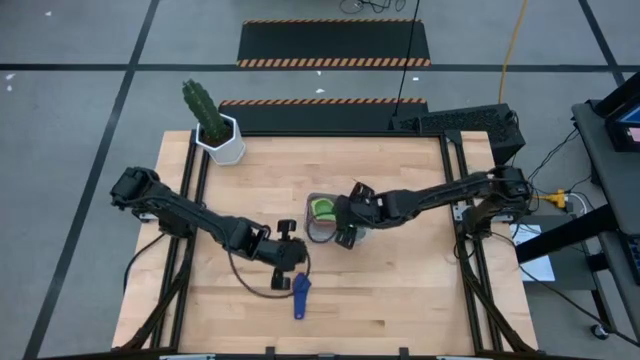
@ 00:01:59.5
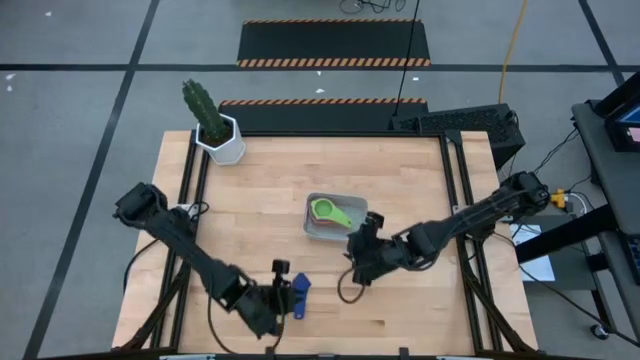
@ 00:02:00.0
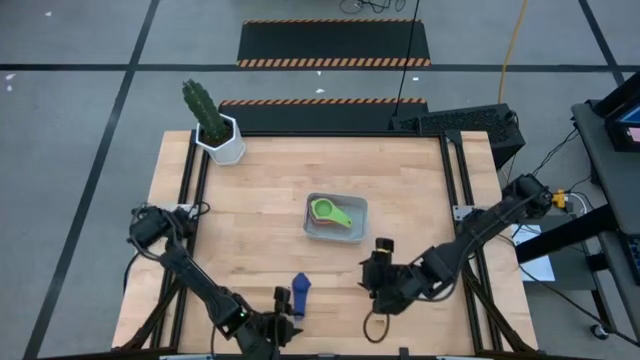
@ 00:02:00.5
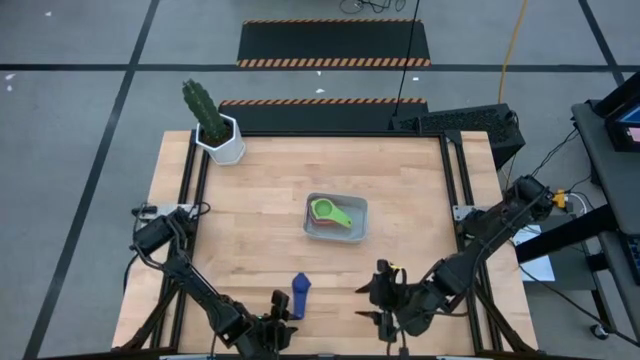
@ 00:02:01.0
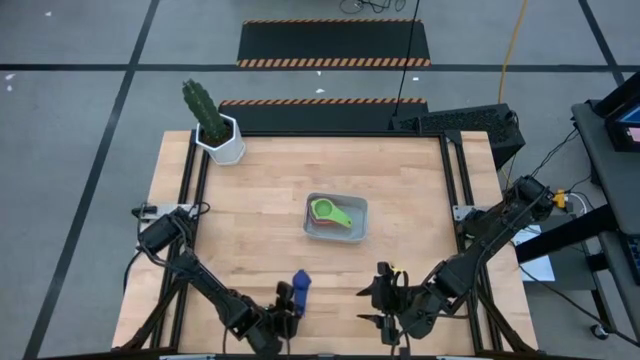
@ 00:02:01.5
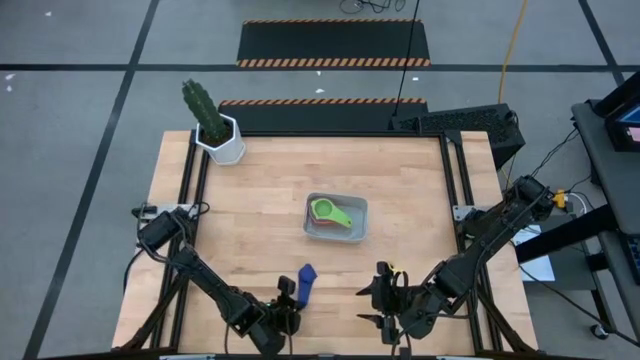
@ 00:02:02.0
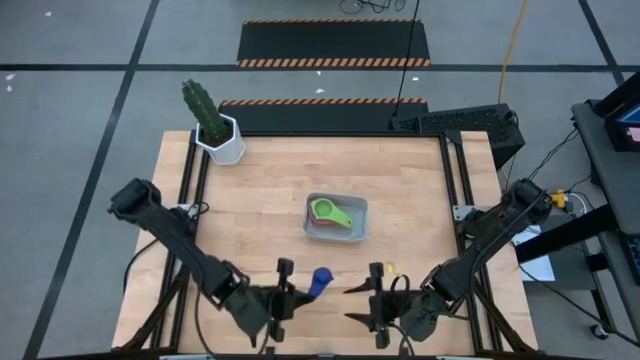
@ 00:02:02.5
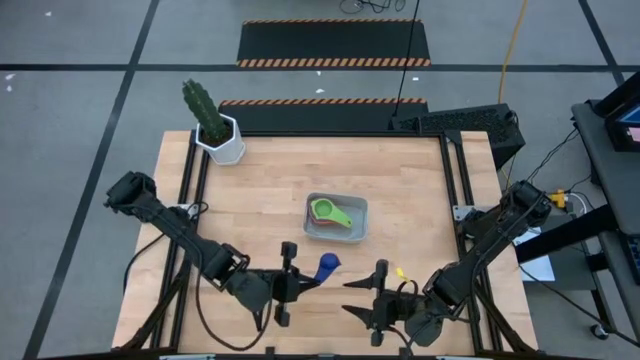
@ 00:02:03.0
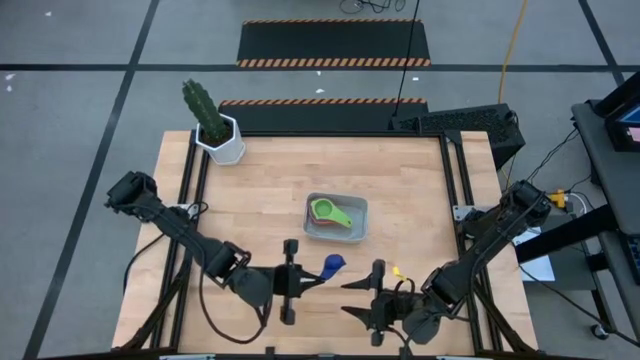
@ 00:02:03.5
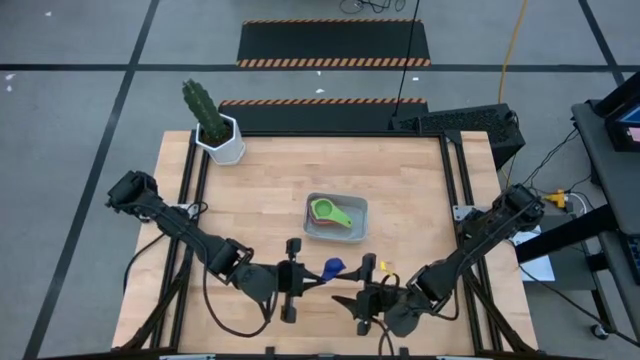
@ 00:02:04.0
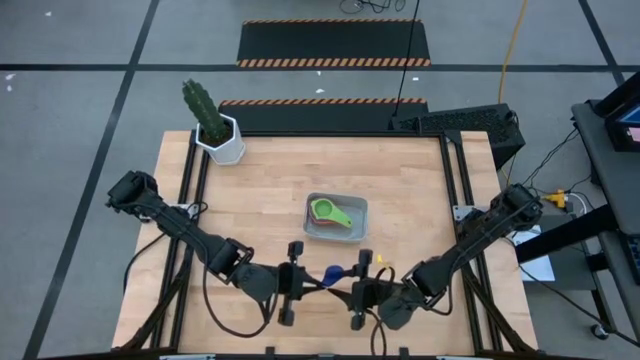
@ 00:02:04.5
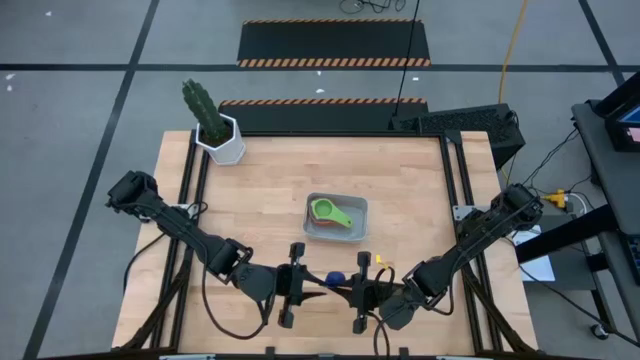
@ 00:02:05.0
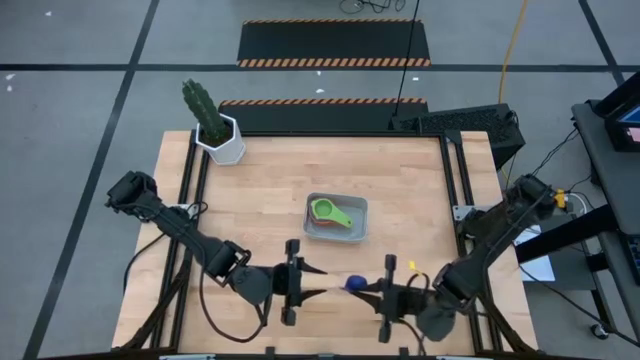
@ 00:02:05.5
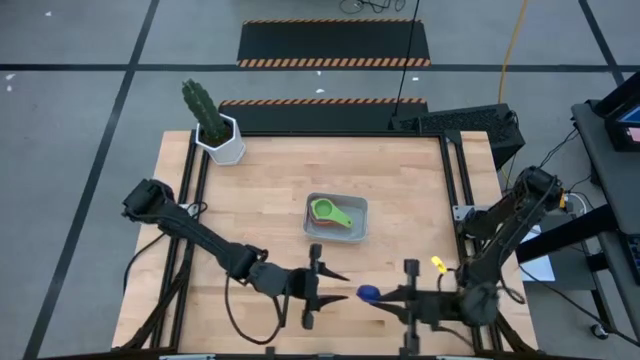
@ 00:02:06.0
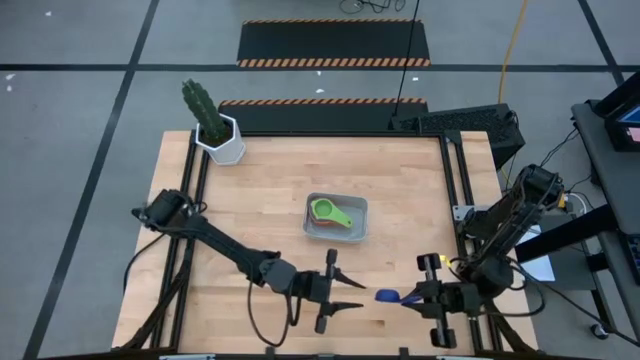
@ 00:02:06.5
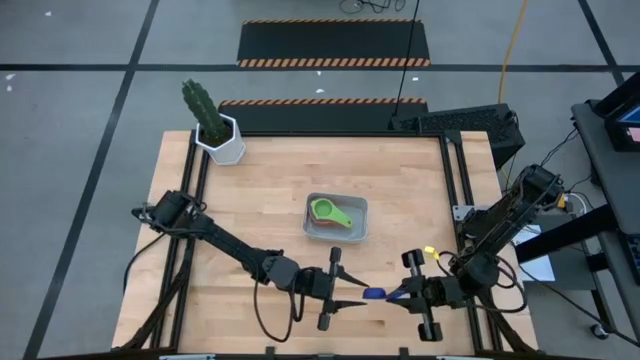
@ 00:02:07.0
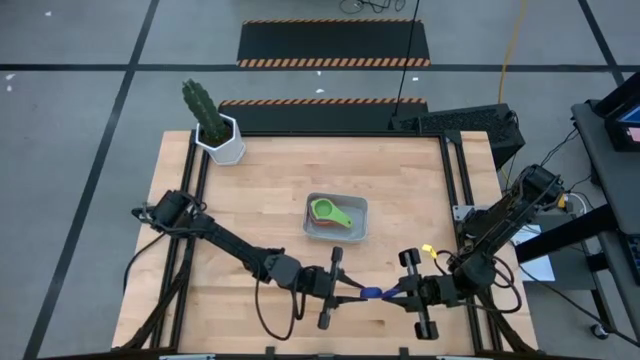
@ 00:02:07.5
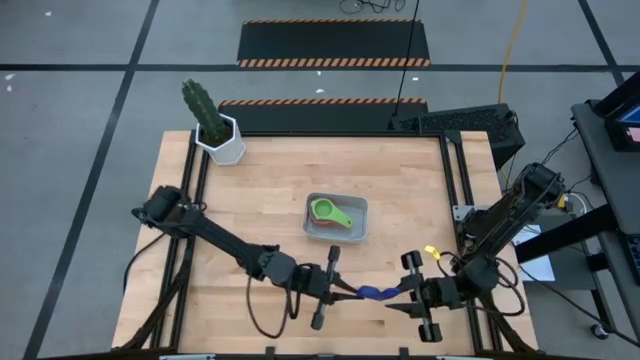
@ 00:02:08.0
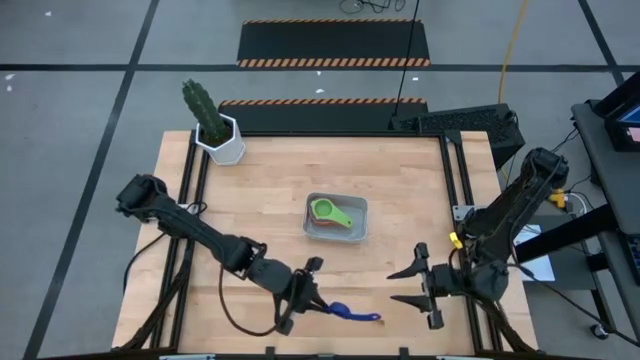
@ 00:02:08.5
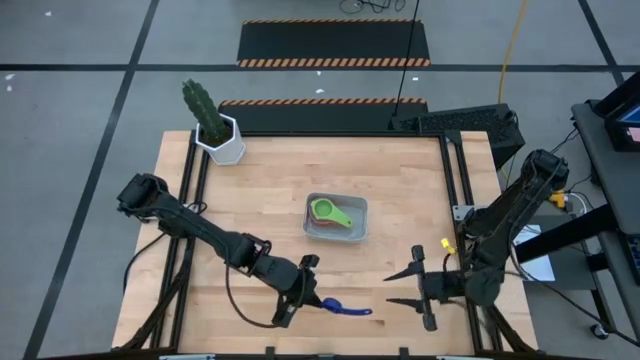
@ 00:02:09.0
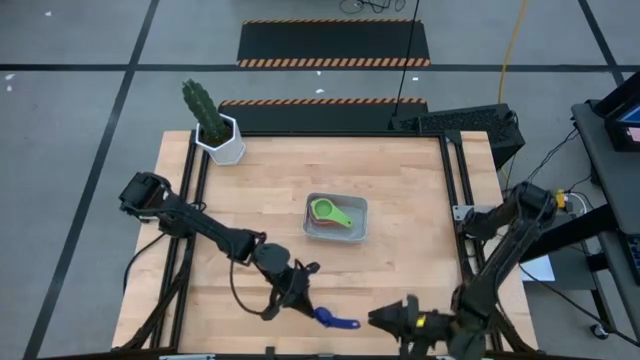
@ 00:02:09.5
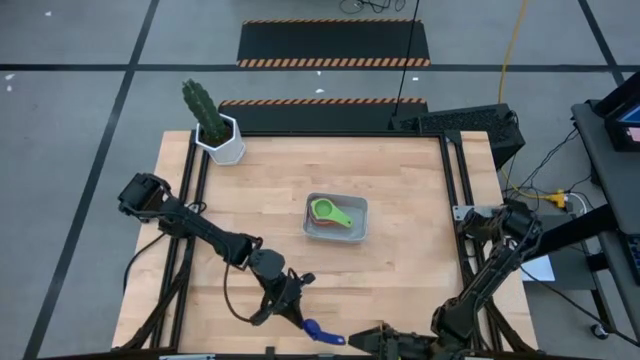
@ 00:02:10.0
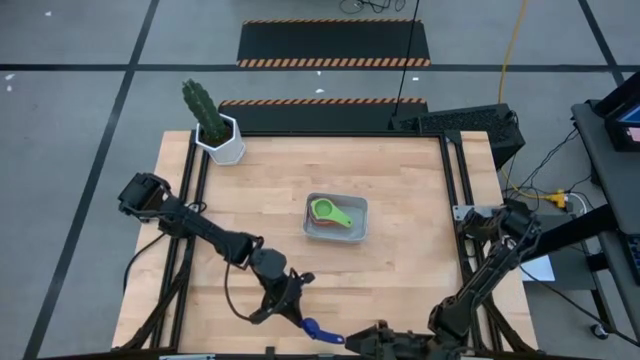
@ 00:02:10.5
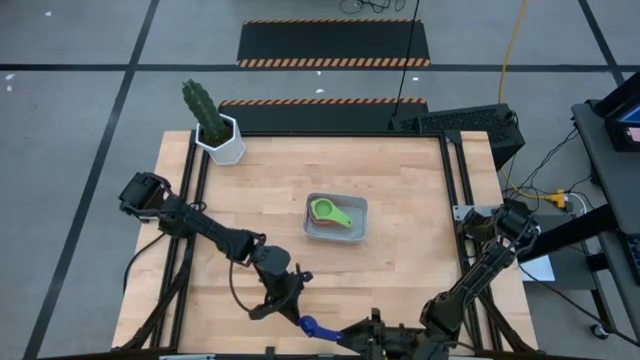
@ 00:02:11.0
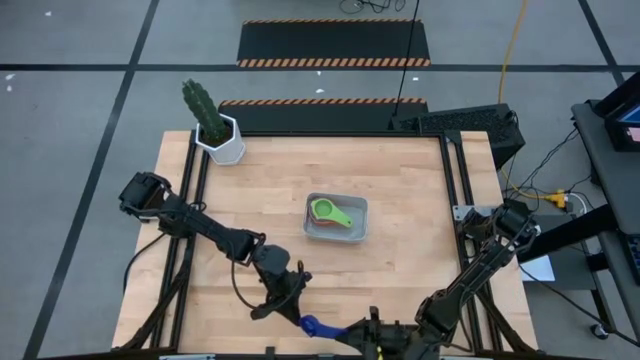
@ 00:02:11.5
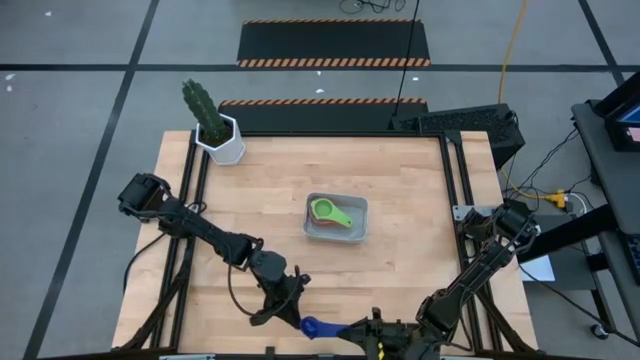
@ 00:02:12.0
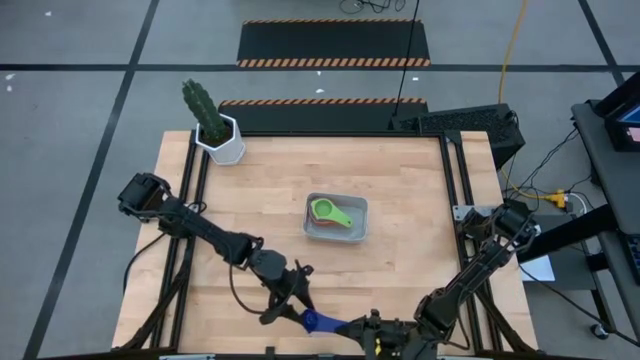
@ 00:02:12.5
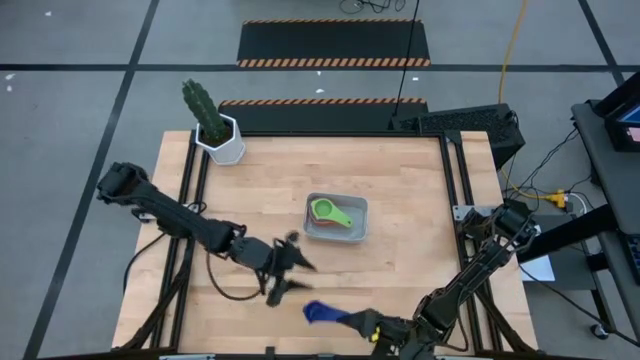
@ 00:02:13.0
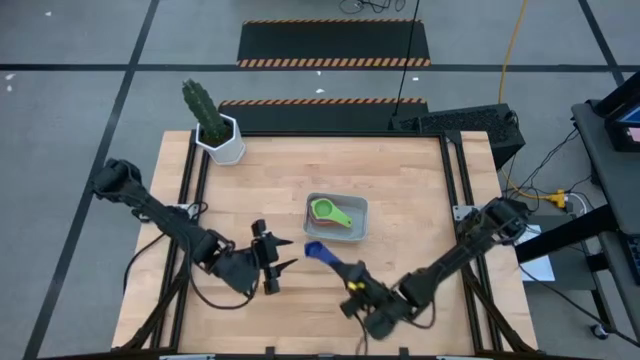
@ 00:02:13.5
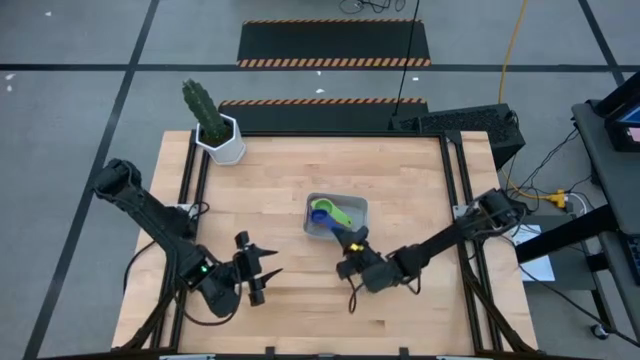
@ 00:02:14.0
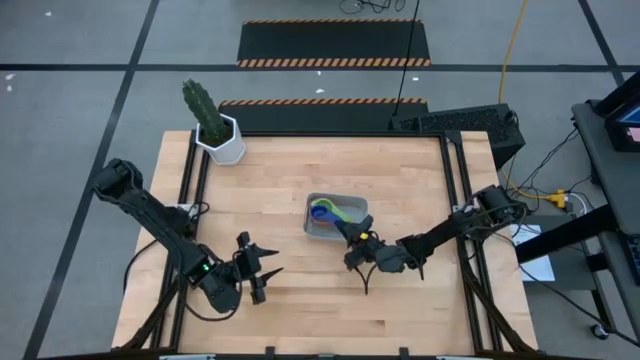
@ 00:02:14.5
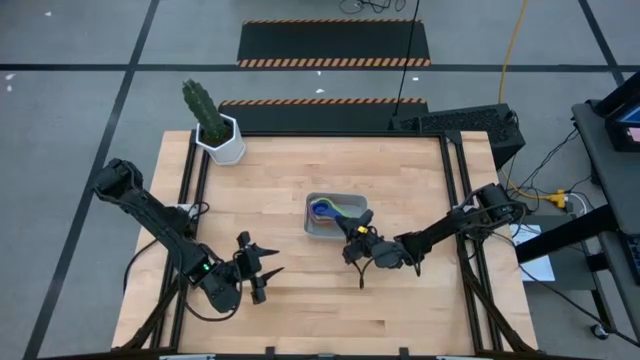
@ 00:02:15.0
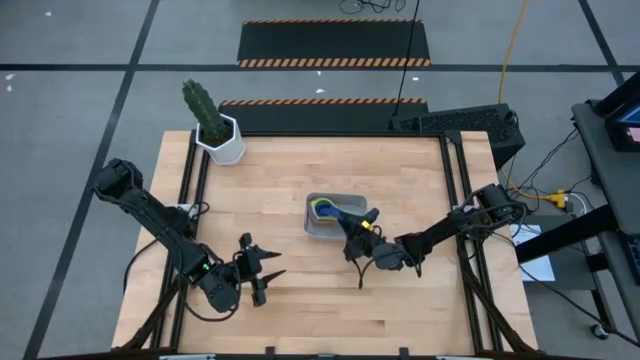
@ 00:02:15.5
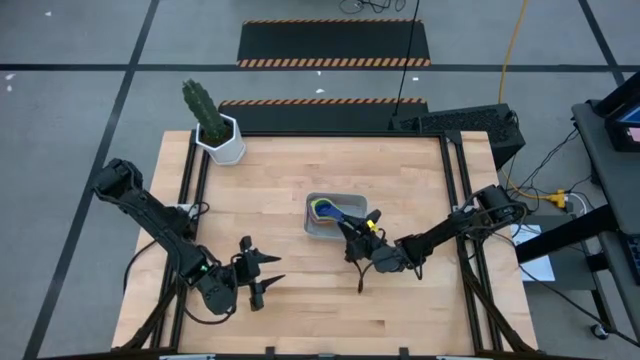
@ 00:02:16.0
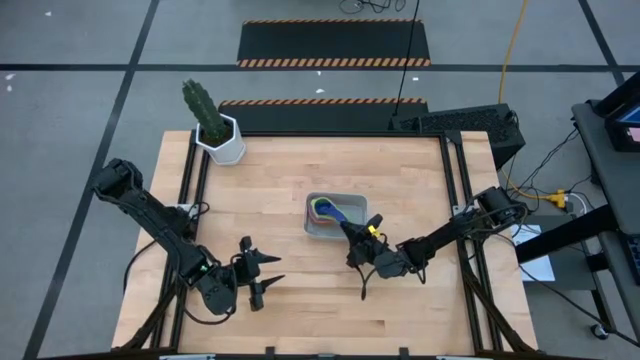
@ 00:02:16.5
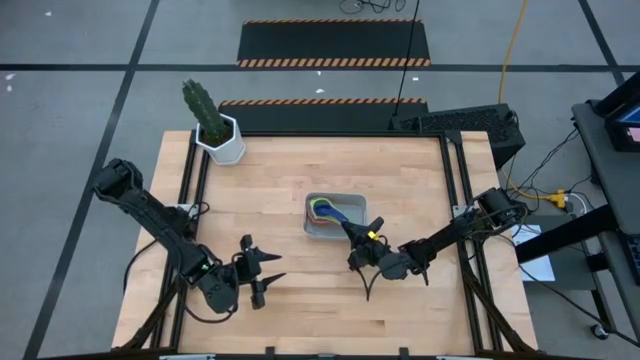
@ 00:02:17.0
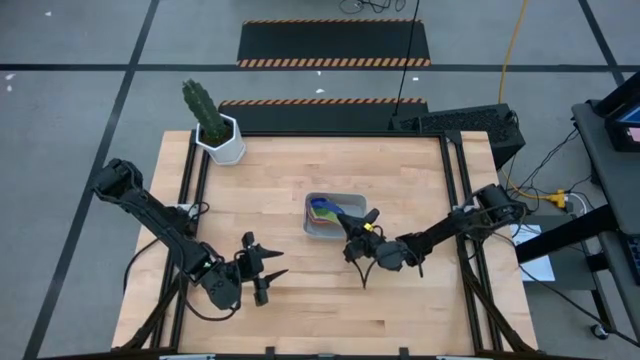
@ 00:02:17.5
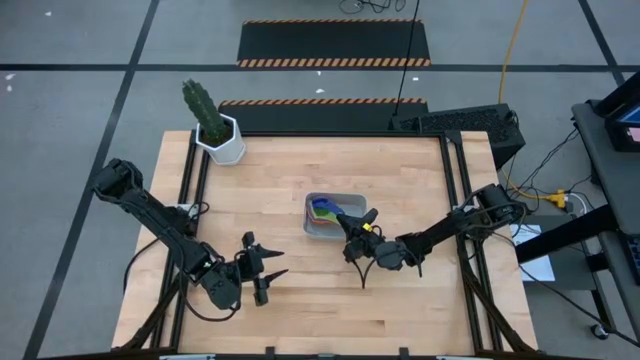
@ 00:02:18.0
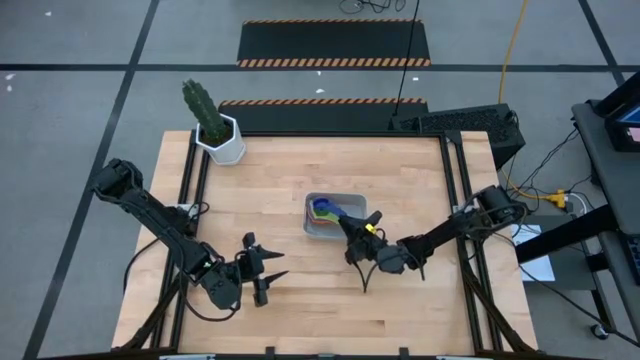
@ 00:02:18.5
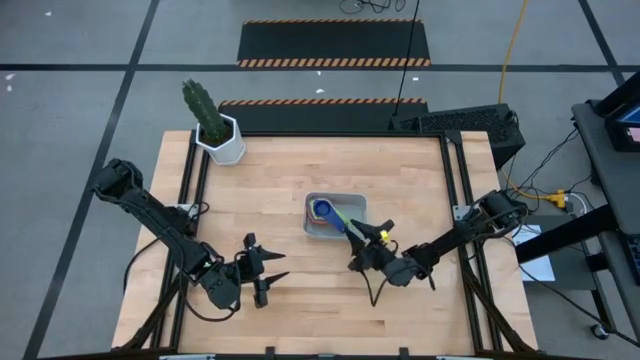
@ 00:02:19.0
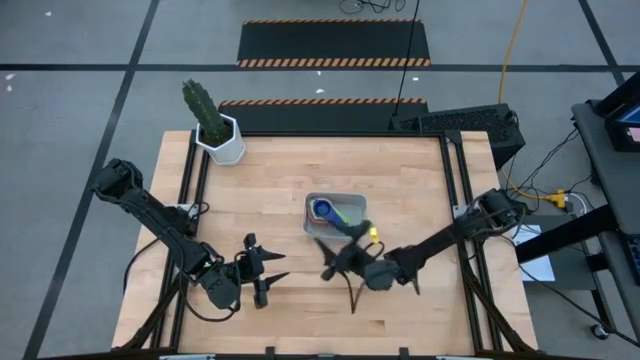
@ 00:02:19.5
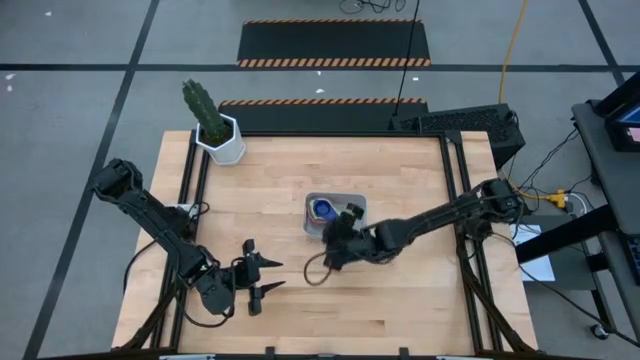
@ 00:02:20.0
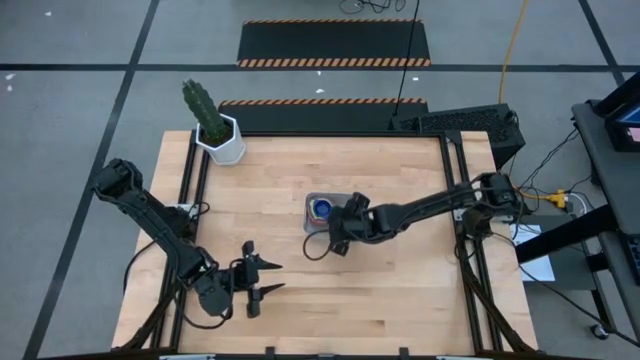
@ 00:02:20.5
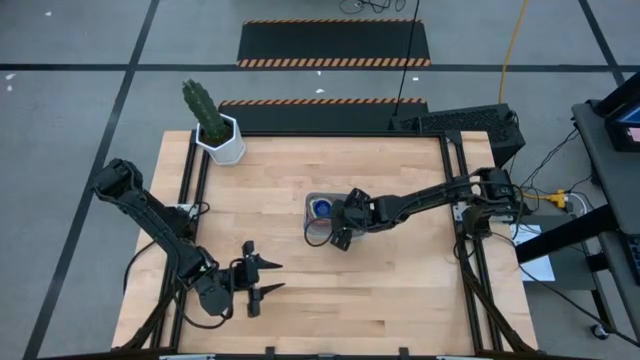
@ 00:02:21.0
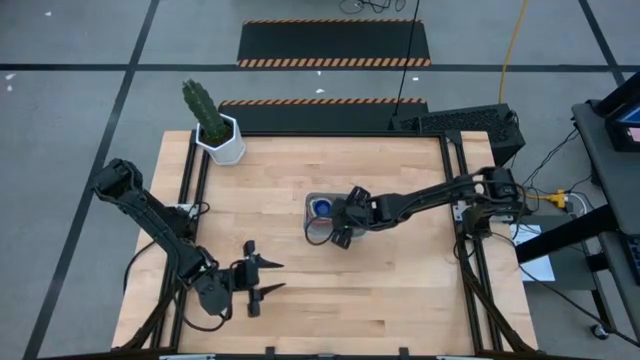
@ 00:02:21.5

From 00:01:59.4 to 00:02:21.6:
Task: Nest measuring cups in basket
Stack the dark blue measuring cup into the green measuring cup
